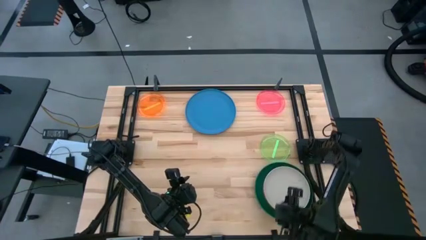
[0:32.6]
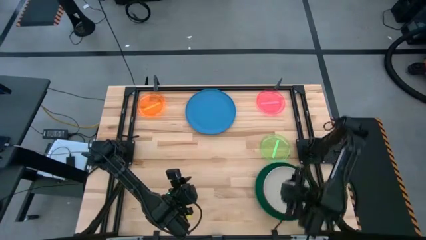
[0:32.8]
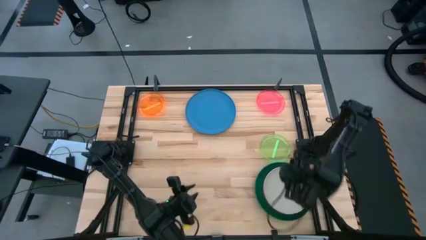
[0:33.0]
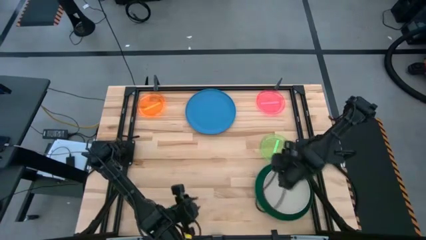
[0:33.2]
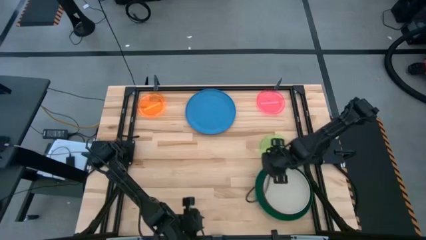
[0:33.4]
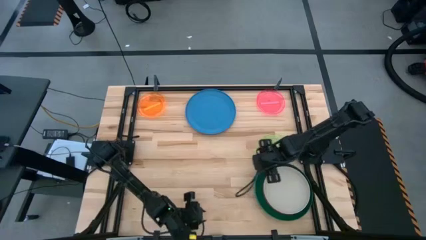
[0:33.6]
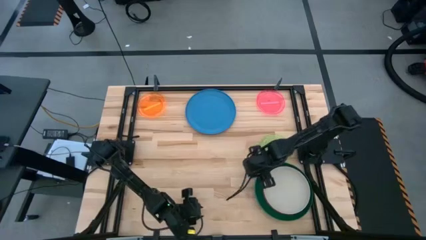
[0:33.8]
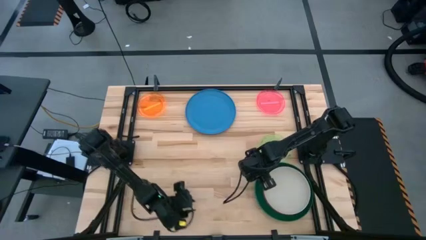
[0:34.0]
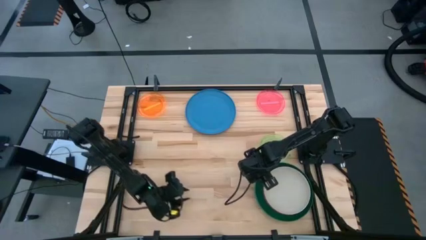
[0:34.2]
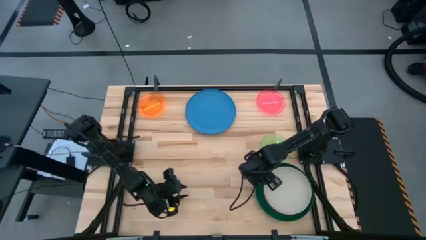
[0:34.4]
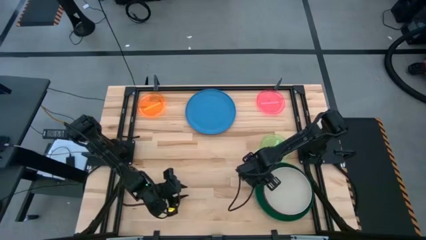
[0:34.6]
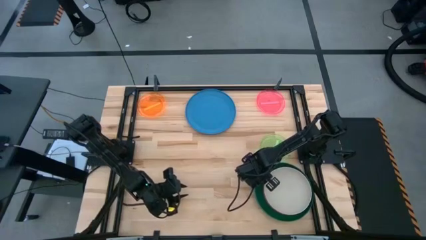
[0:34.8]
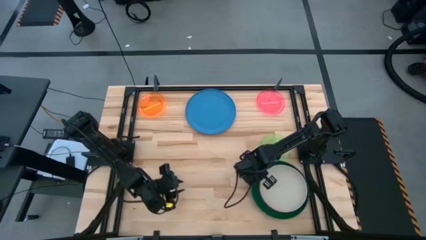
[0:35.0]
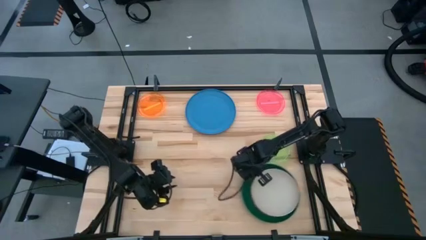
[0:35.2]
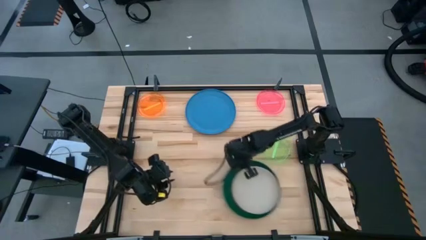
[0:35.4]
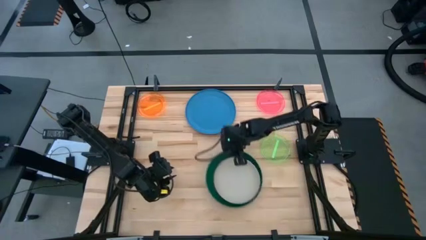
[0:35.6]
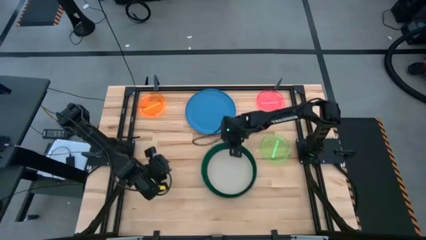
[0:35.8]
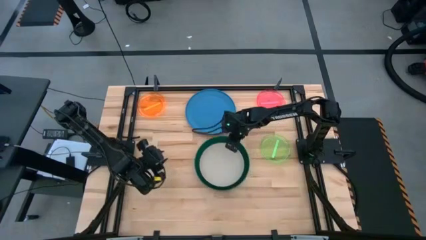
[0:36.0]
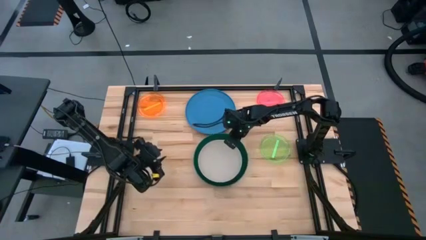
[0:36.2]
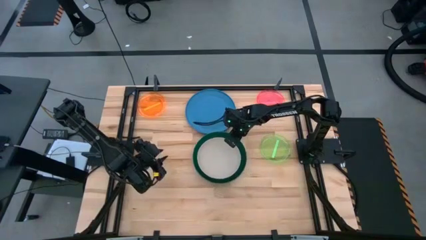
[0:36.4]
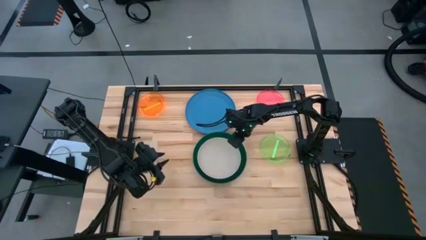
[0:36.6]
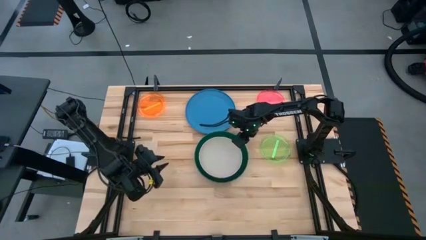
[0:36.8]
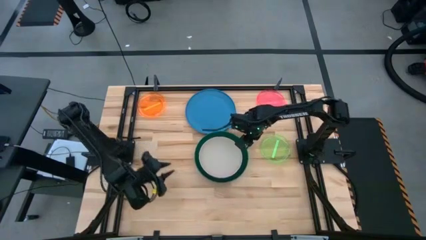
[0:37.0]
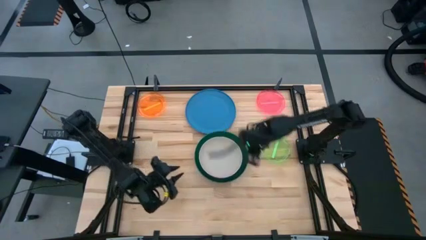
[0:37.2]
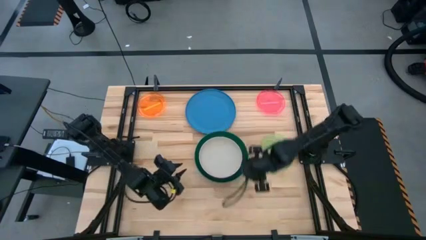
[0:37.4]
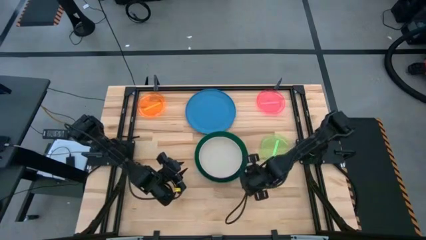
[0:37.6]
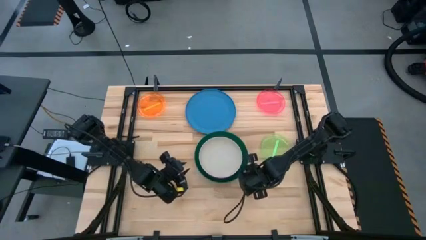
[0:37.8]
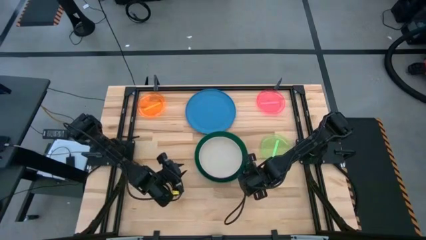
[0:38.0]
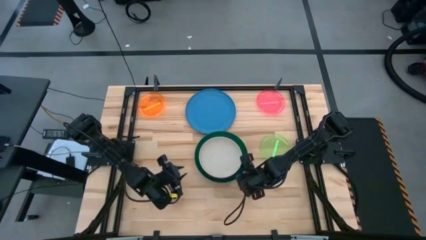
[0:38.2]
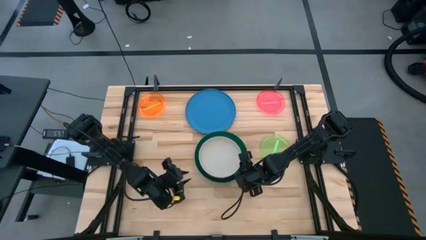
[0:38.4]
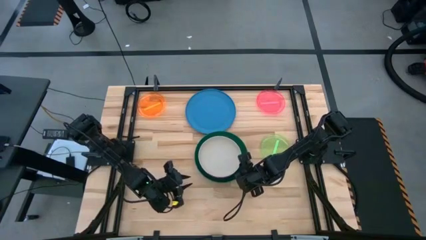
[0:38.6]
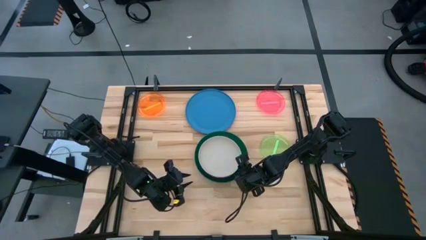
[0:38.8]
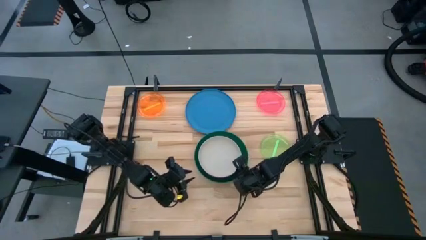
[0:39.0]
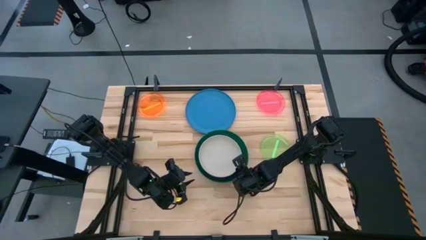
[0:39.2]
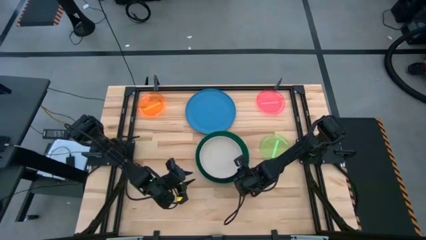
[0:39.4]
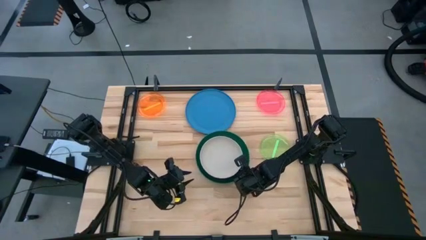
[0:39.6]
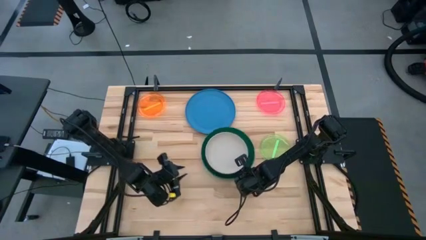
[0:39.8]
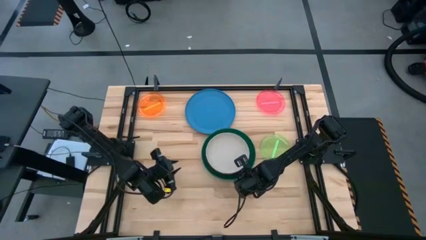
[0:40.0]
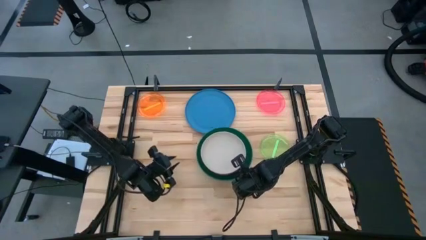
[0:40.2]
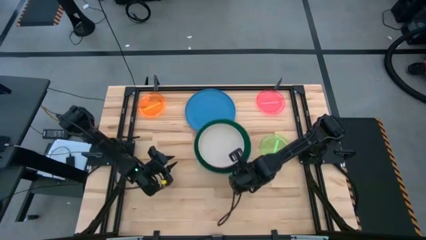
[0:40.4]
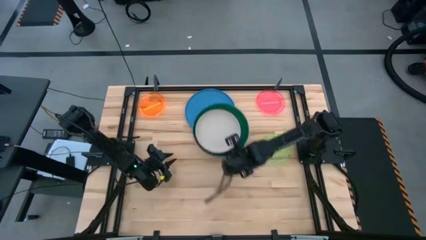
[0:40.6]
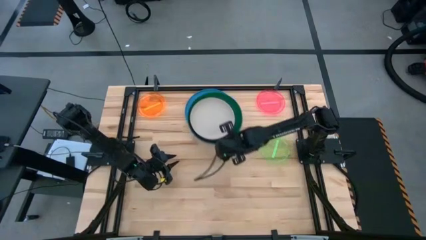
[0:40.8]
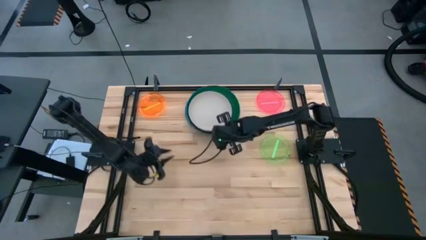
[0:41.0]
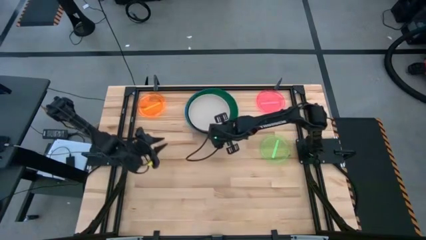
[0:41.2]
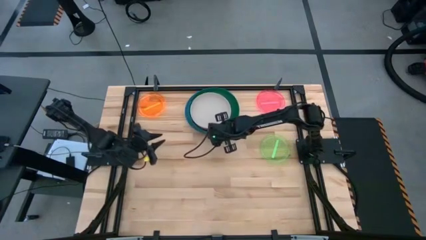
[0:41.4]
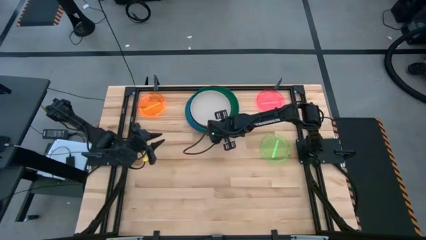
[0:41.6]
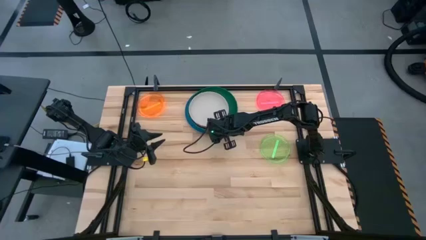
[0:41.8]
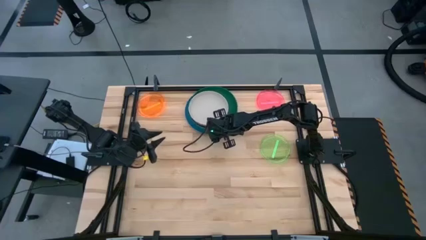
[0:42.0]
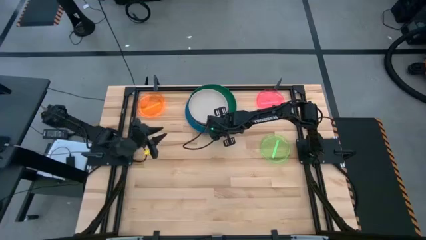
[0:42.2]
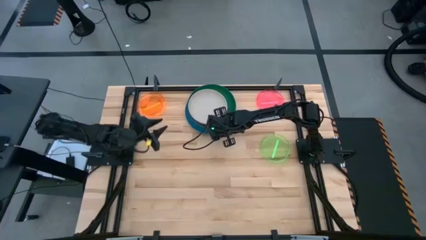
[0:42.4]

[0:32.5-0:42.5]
Task: Stack plastic plates
Stack the stacked plates on top of the light blue plate

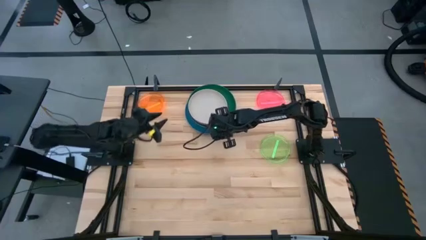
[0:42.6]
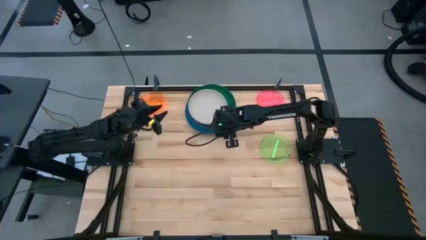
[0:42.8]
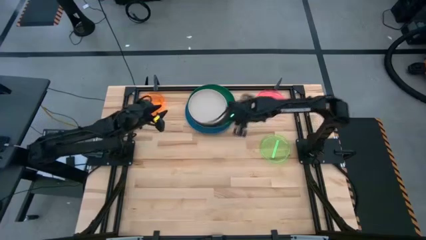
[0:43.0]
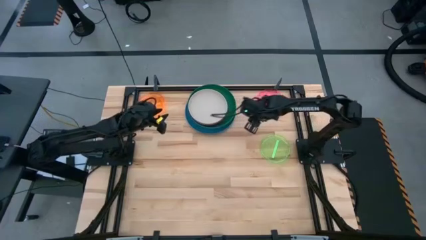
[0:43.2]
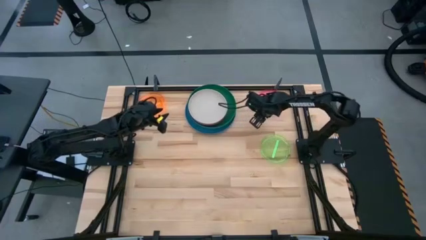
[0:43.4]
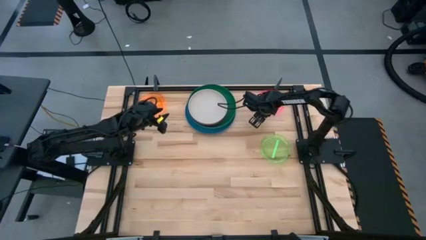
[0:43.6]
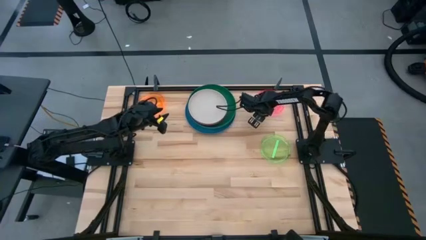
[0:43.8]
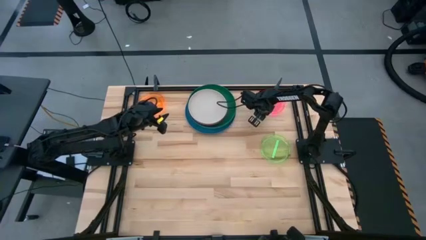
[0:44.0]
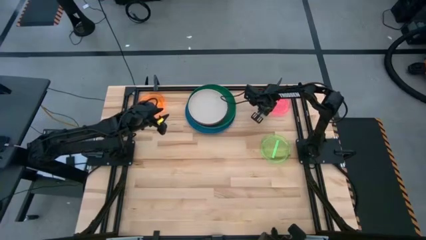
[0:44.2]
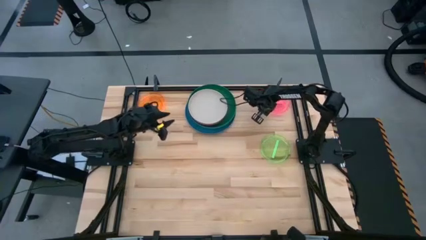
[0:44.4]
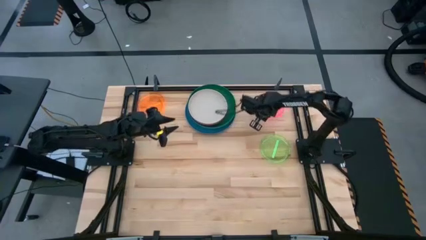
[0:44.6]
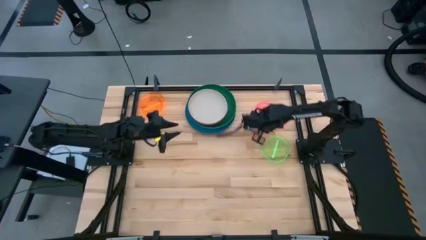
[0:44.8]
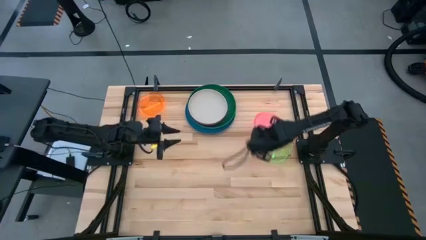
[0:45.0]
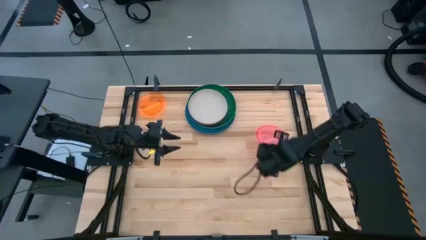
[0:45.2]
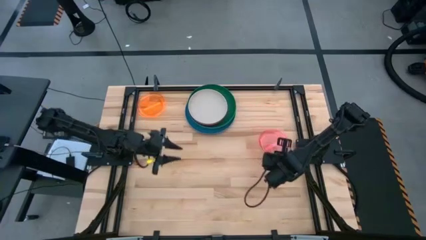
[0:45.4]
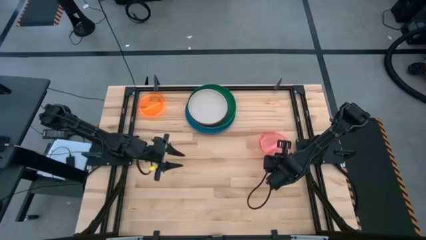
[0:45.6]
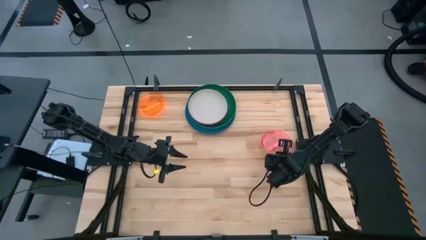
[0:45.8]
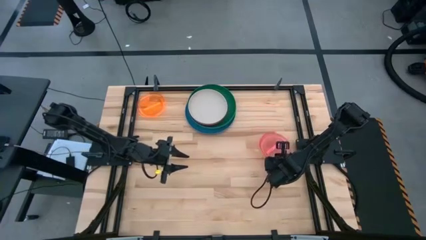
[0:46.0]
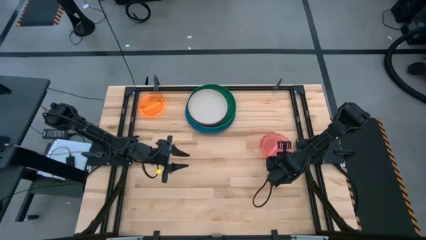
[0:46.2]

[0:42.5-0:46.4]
Stack the pink plate on top of the green plate

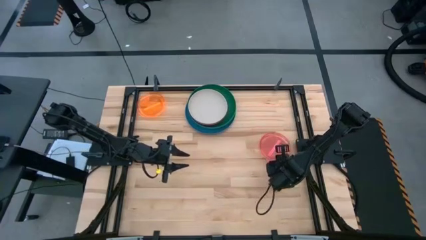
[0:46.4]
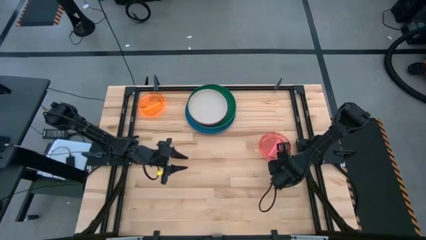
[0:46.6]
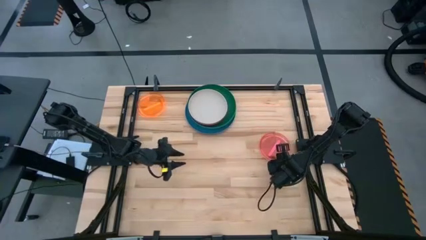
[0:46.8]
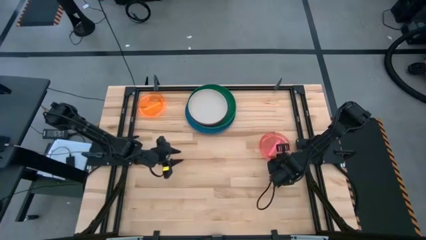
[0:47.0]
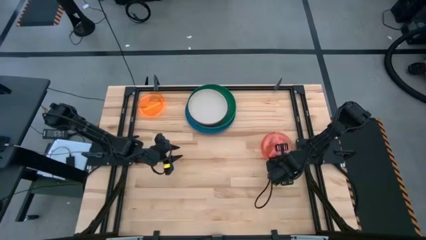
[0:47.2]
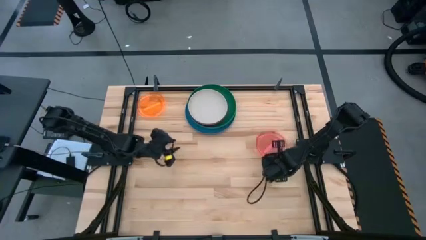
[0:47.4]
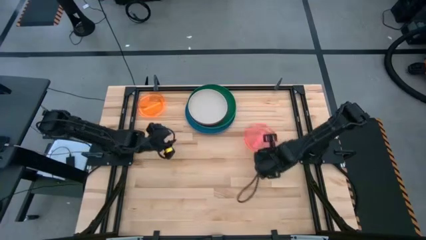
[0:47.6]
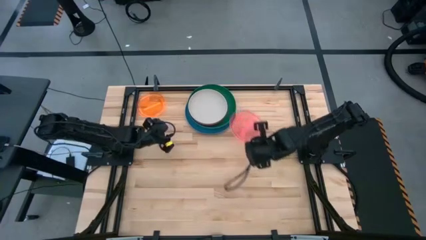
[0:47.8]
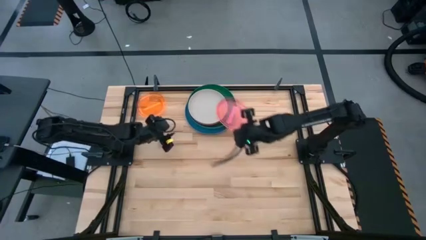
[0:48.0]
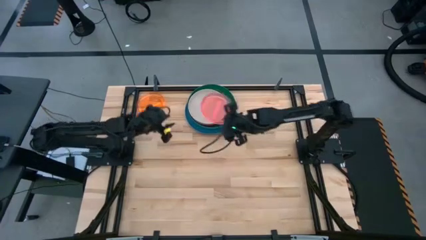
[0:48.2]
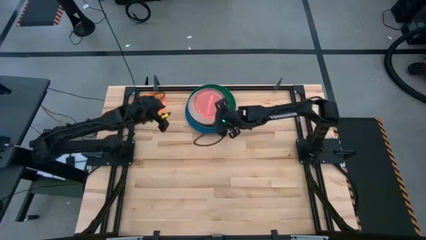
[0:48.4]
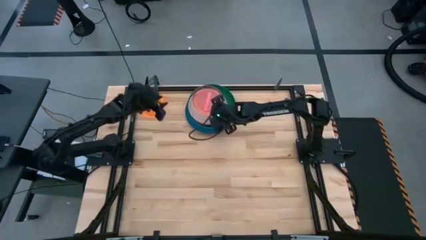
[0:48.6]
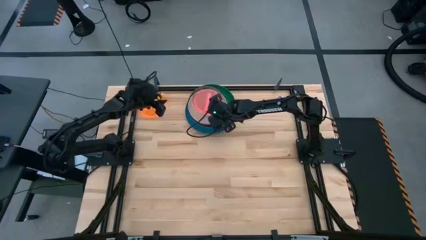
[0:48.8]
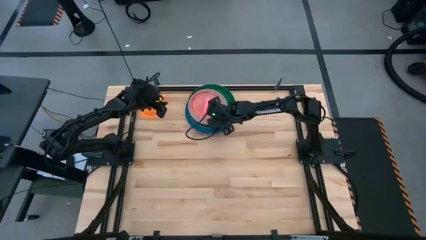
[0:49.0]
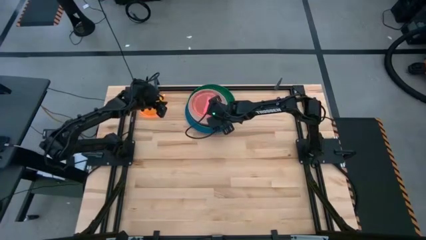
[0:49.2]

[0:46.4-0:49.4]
Stack the stacked plates on top of the gray plate
